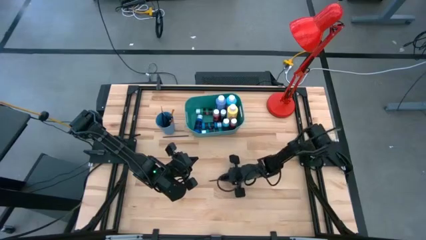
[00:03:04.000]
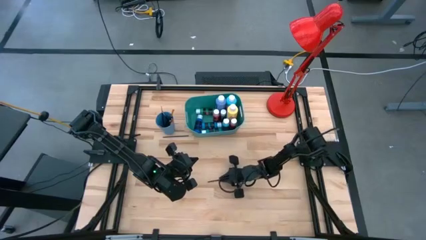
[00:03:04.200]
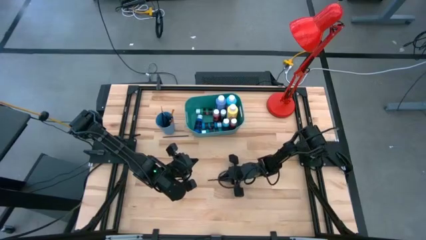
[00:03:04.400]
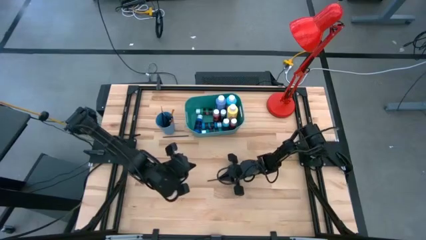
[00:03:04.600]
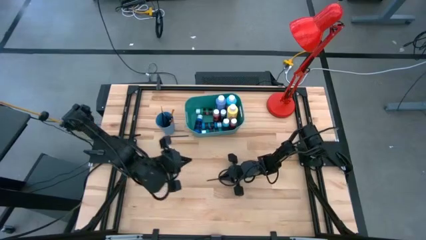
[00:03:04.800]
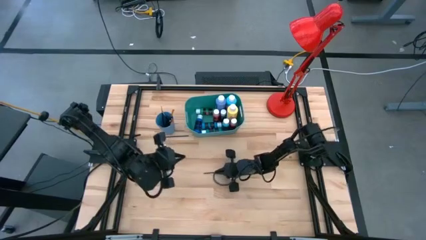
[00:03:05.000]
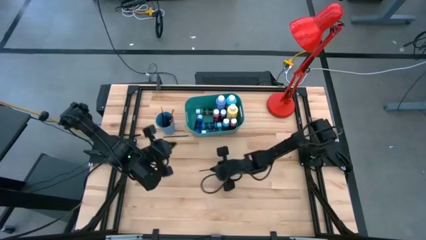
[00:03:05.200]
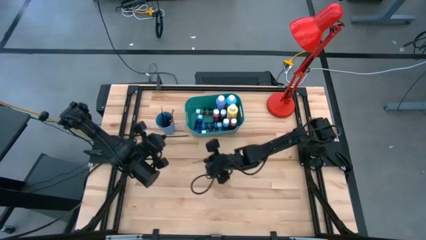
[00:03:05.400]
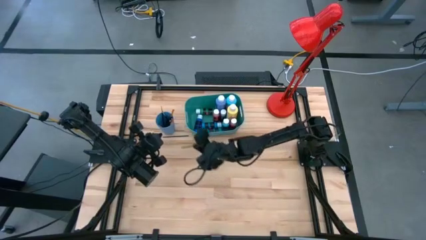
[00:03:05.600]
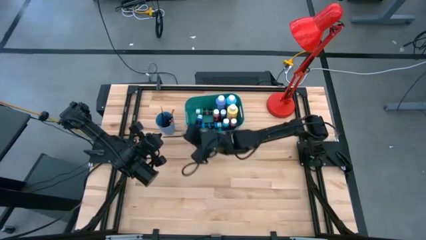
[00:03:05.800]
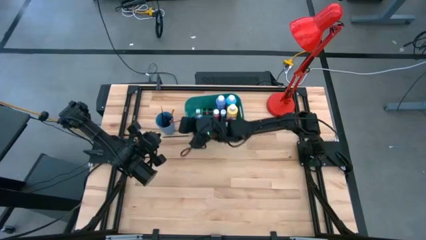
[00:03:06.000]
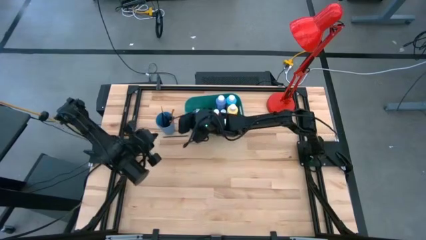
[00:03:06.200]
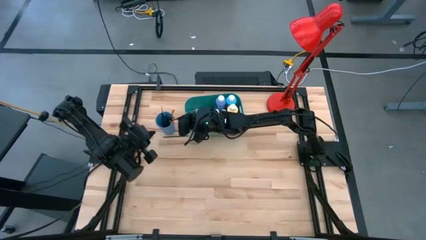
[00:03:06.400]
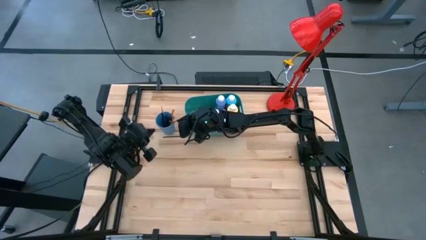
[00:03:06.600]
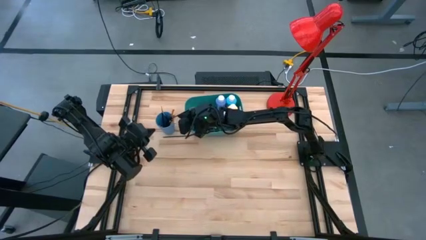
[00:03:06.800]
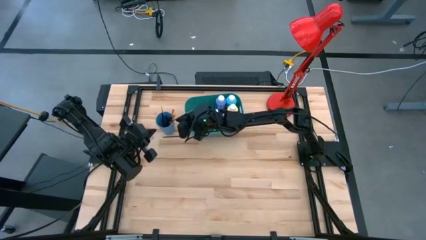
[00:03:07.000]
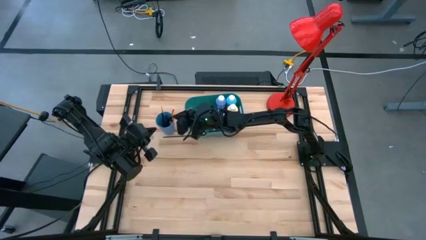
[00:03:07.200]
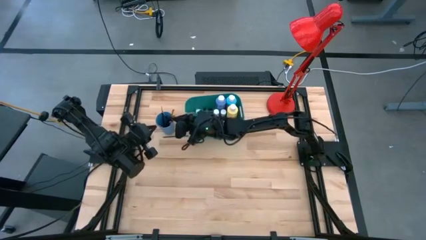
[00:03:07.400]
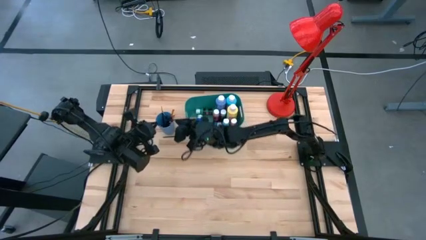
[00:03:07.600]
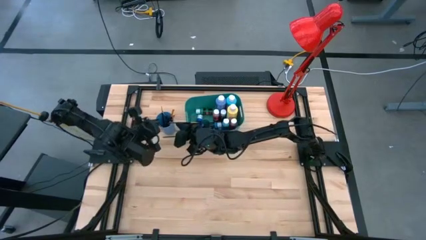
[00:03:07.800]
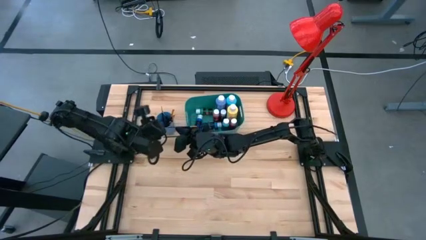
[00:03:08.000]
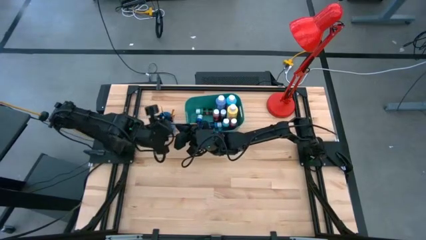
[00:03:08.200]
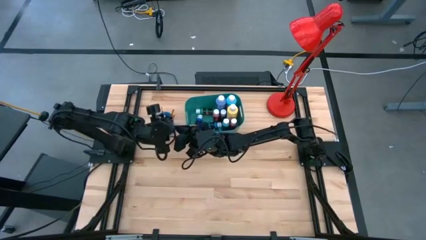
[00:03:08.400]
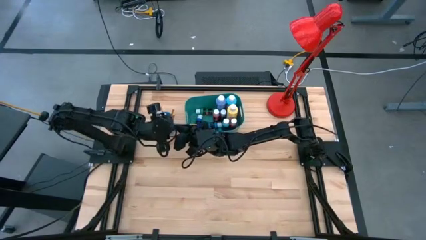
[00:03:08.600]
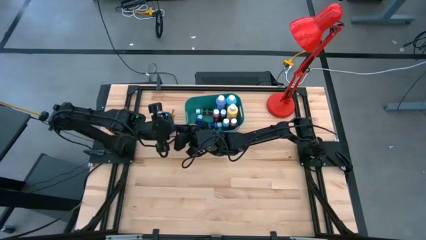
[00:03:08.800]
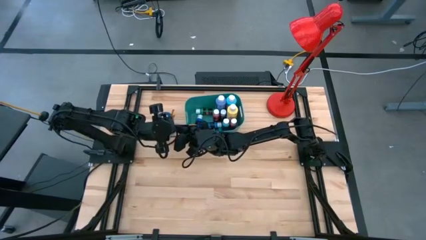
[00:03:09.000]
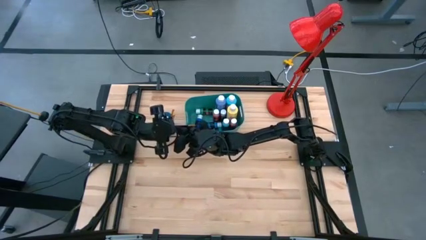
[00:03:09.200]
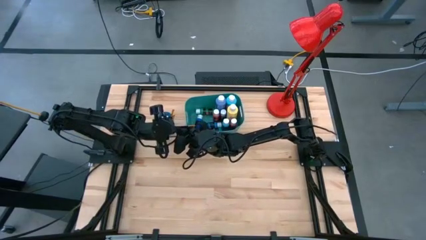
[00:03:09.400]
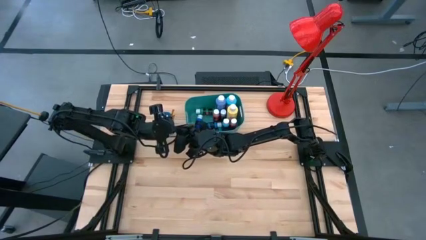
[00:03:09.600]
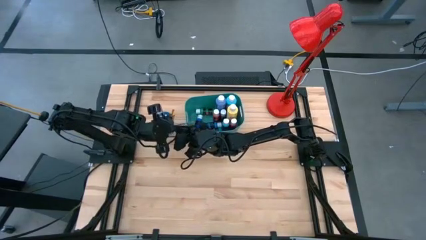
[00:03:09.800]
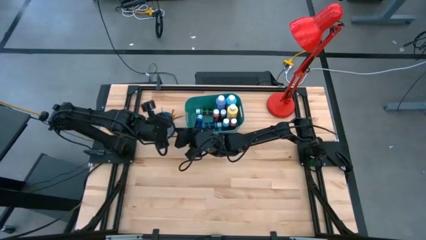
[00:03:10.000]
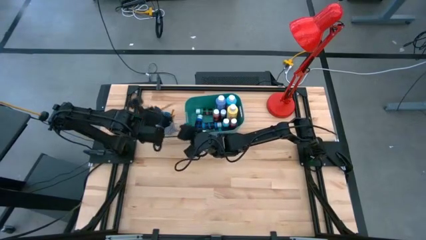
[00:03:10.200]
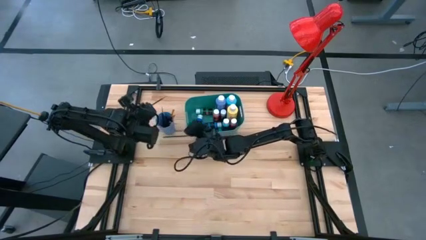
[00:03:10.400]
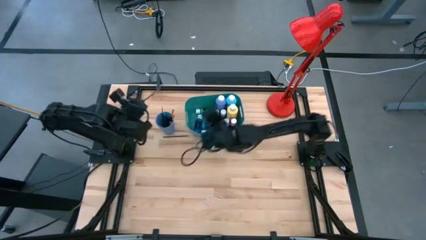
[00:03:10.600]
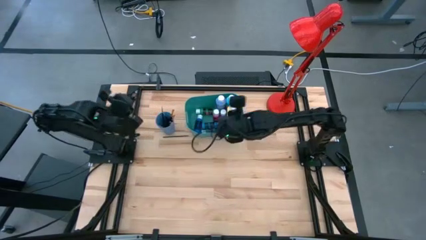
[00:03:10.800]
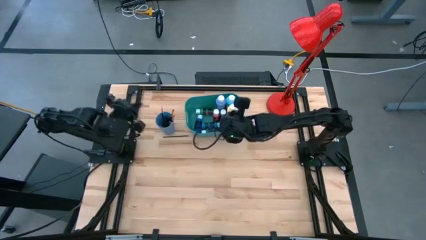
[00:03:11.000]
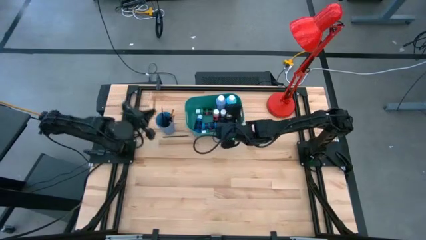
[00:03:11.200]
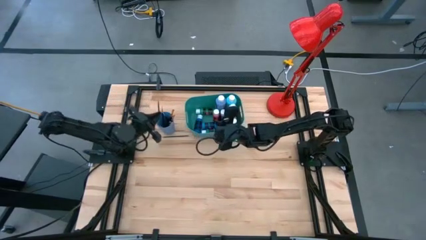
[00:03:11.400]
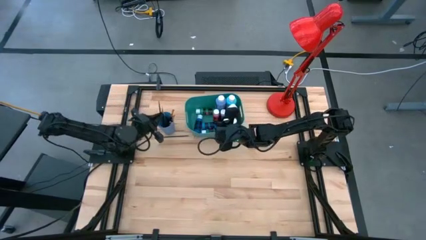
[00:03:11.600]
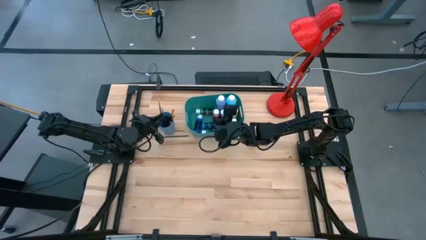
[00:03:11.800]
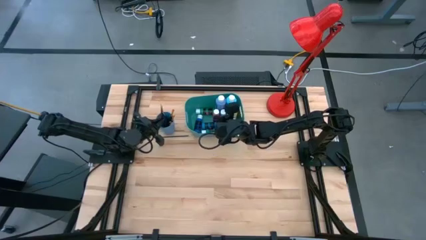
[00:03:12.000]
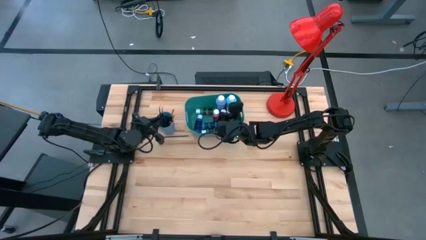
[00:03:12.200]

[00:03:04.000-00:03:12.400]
Task: Pick & Place Paint Supplies
Put the gold paint brush into the blue cup

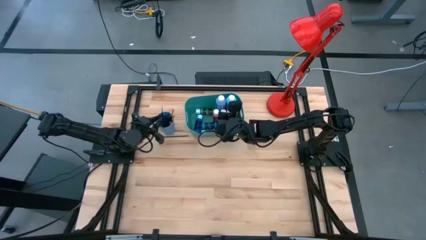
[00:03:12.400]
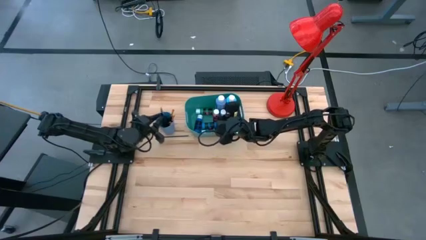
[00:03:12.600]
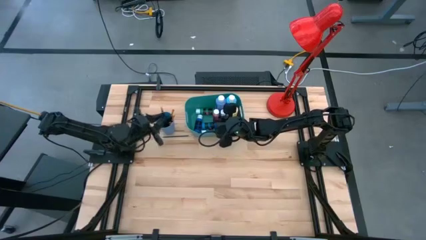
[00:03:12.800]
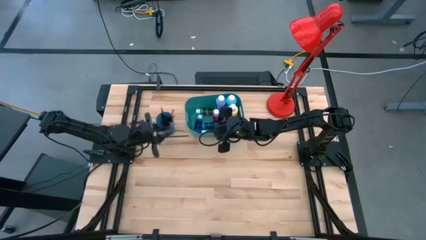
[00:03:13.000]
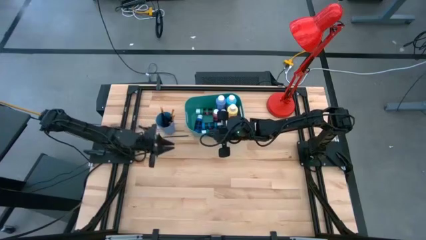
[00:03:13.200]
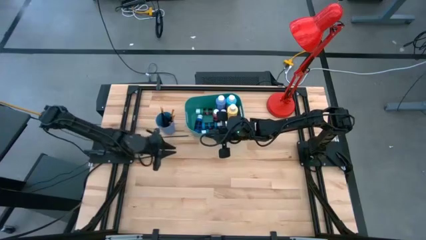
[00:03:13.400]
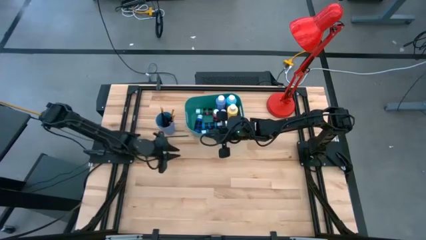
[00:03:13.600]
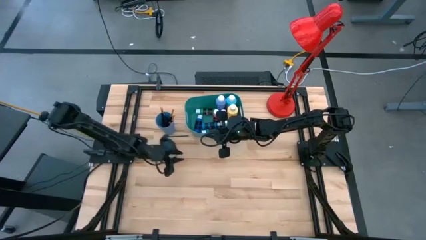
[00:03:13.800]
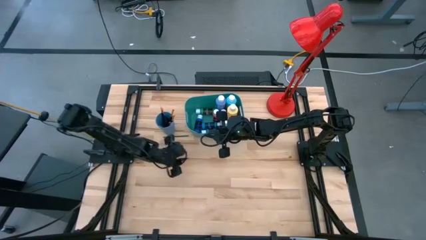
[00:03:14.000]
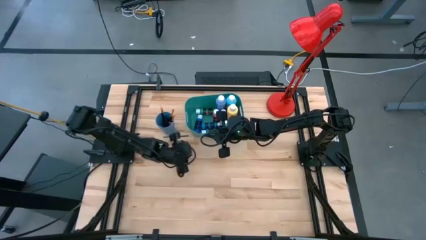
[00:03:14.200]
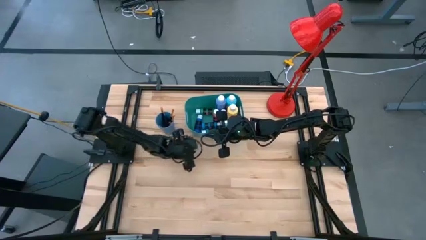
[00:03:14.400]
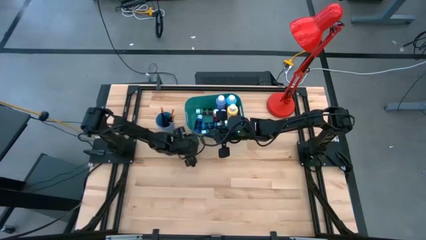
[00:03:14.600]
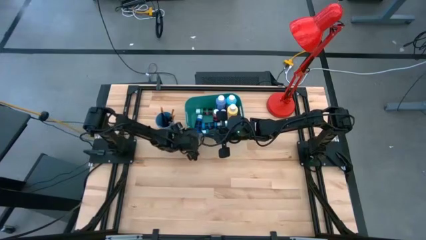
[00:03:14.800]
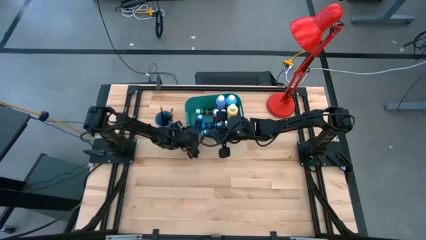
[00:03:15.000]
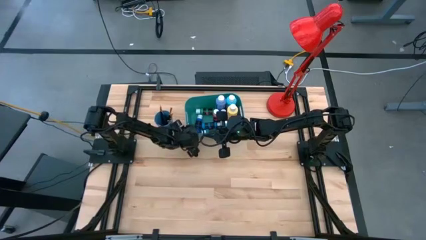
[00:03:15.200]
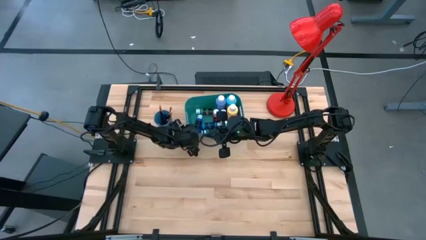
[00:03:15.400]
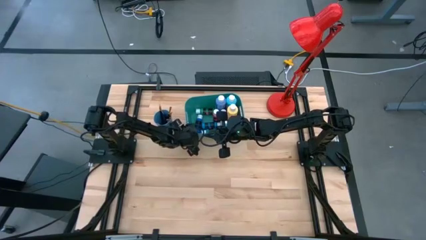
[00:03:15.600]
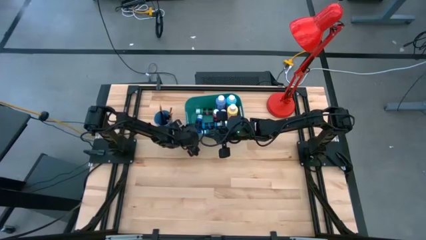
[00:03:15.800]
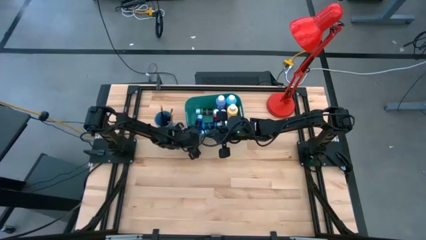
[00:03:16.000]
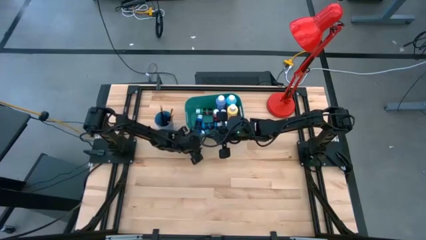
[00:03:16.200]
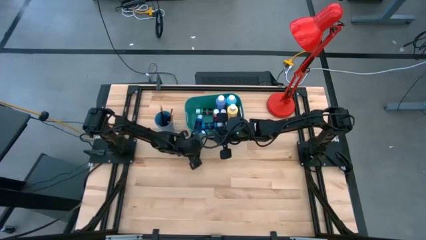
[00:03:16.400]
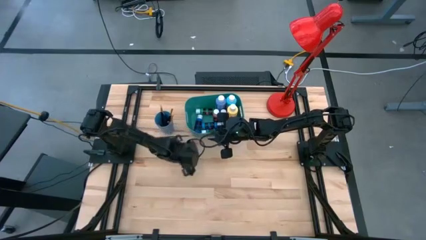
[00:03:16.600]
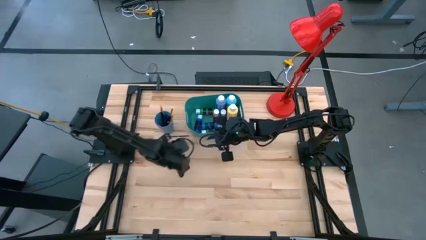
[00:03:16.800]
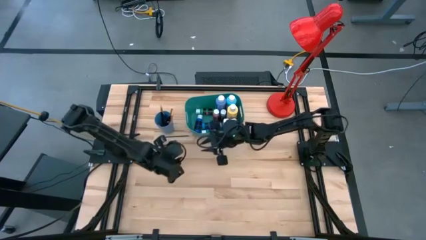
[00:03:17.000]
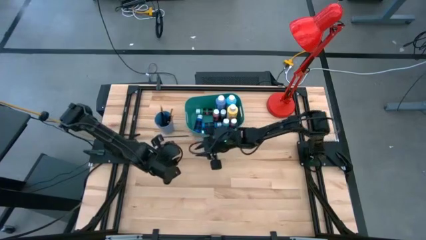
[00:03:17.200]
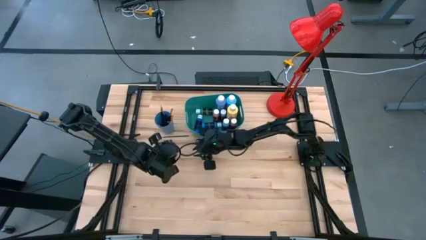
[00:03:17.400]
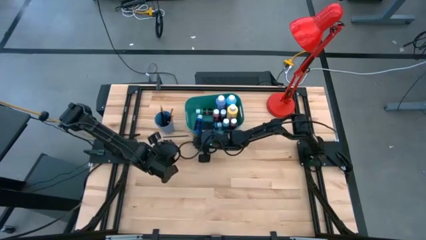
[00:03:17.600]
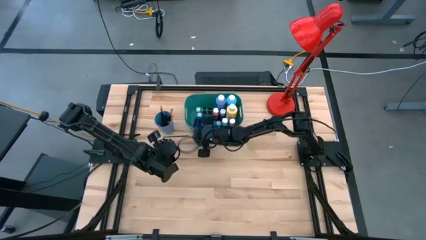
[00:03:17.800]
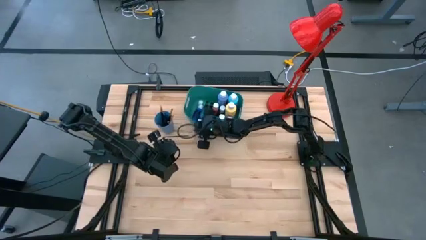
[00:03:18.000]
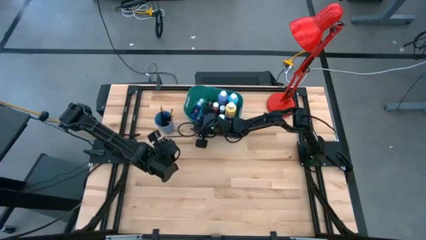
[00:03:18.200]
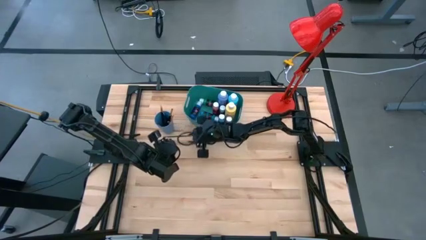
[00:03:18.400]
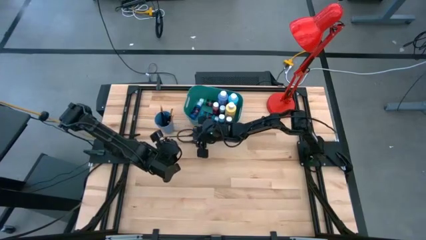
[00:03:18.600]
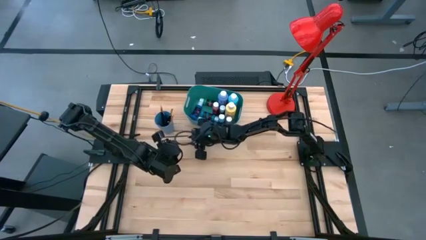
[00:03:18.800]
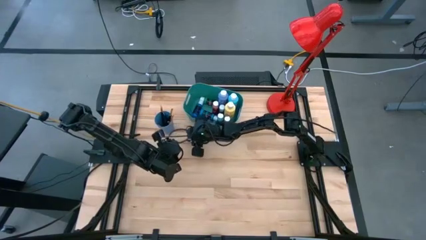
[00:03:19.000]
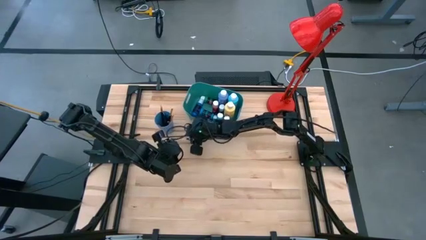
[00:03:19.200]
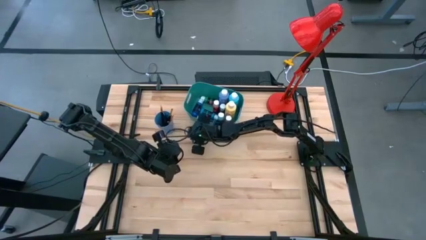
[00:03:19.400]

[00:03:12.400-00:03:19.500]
Adjust the green bin

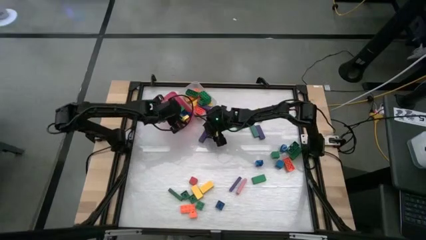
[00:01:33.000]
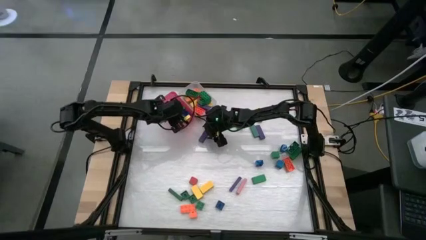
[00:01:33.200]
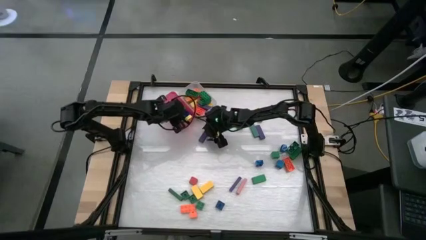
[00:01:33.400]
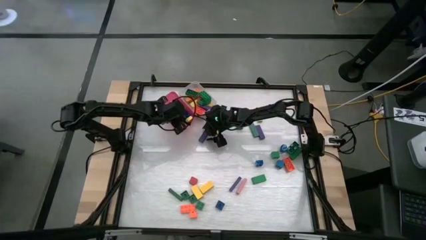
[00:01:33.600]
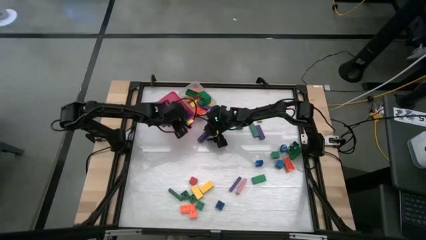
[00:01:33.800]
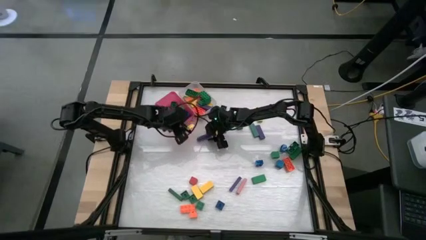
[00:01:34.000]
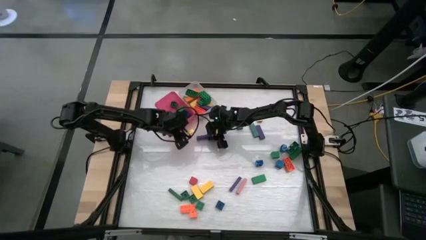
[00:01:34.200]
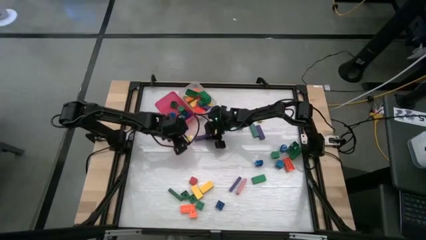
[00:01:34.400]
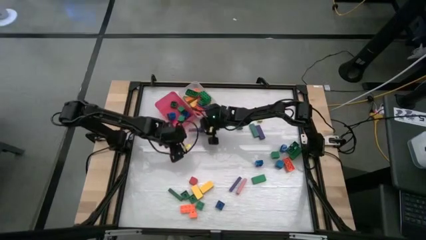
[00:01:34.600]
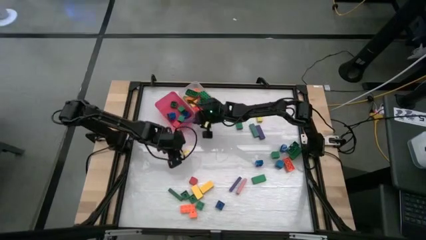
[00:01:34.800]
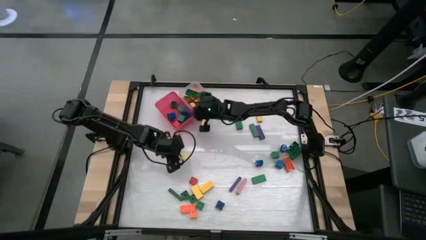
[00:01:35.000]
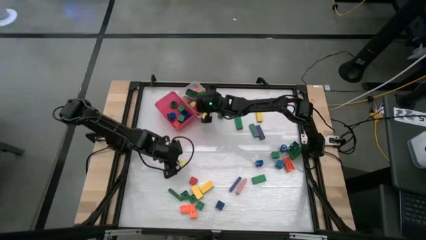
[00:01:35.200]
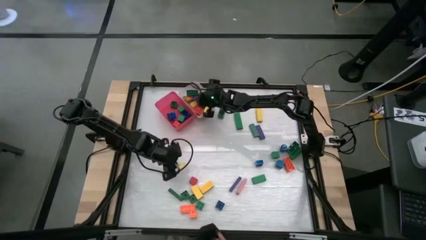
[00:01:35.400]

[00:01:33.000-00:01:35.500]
Task: Sort blocks by size
Put the big purple block into the white bin
